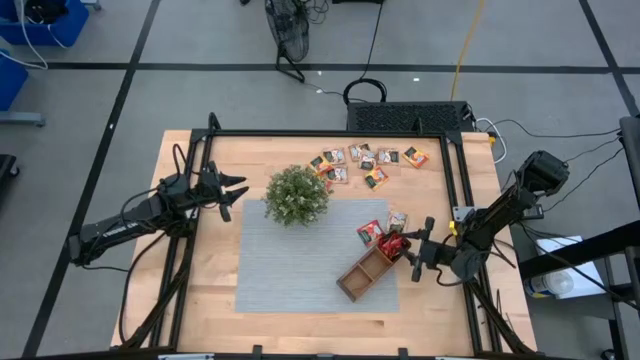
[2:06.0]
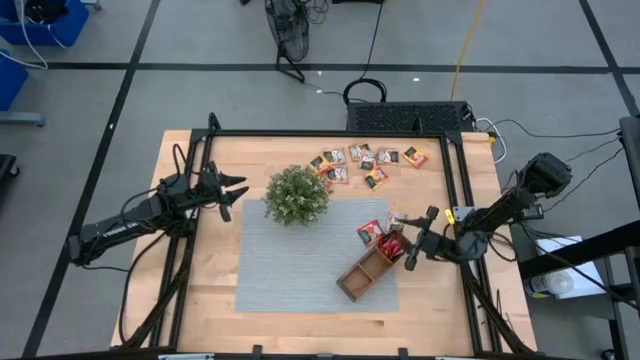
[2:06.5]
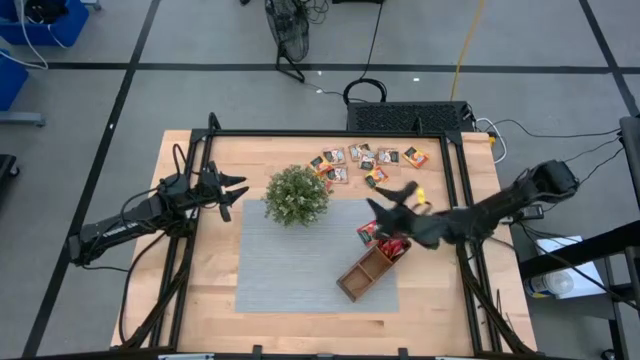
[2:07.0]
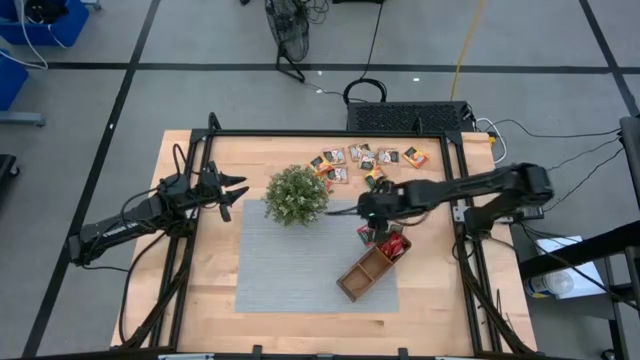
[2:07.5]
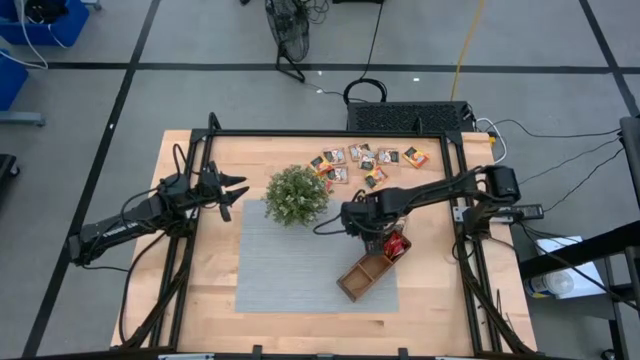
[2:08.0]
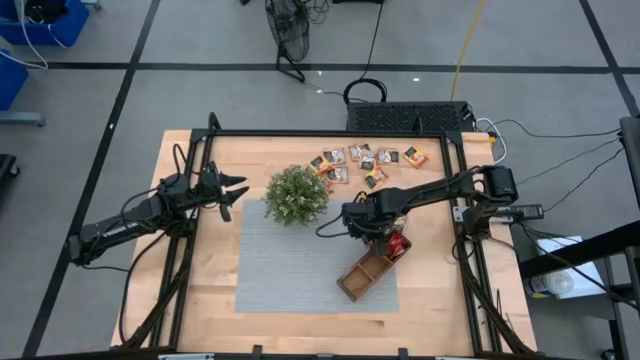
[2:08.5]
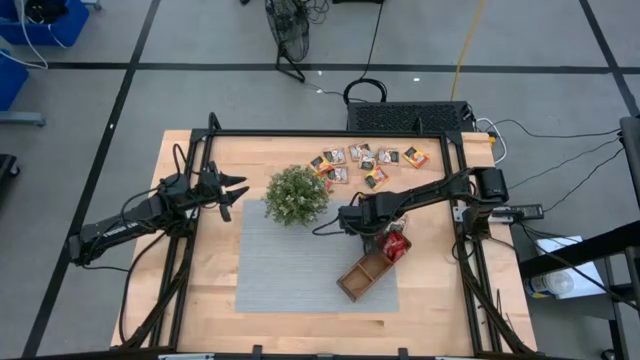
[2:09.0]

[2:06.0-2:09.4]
Task: Pick & Place Tea
Put the strawberry tea sachet into the brown organizer

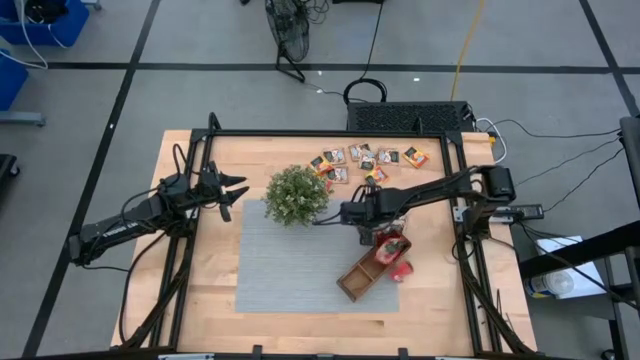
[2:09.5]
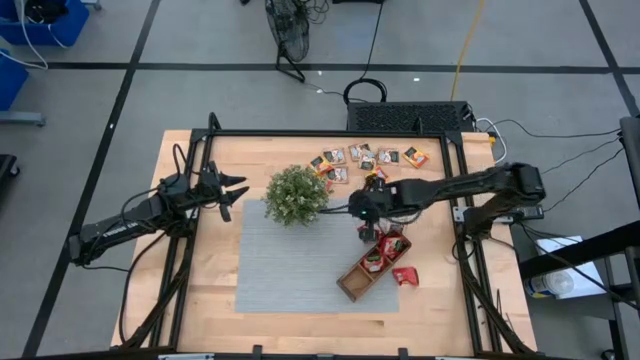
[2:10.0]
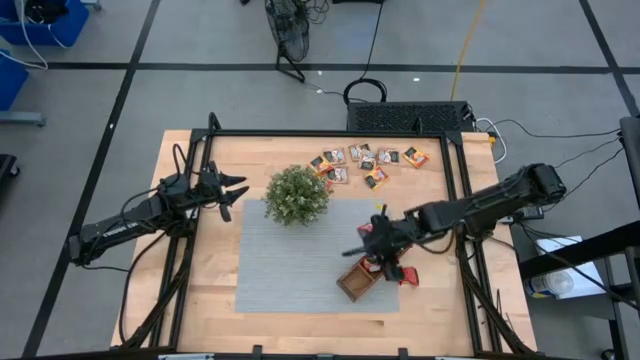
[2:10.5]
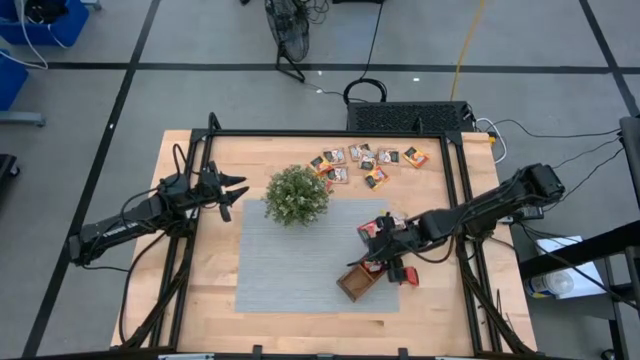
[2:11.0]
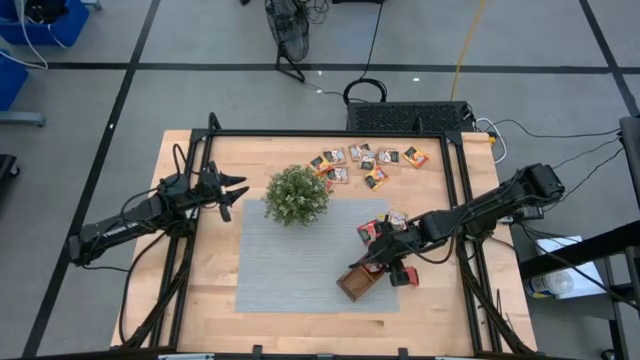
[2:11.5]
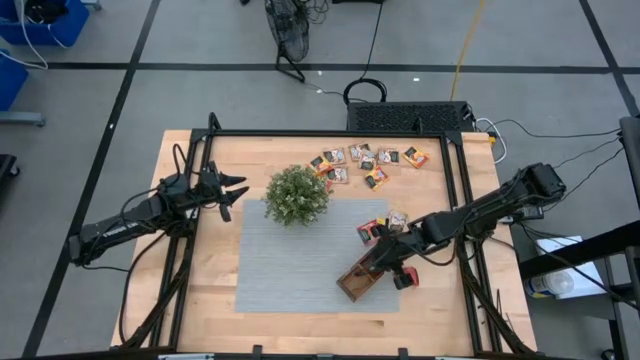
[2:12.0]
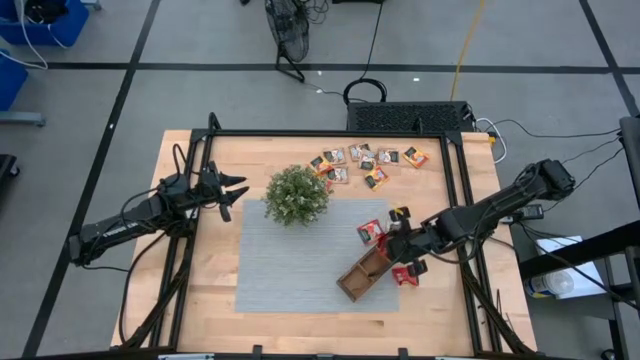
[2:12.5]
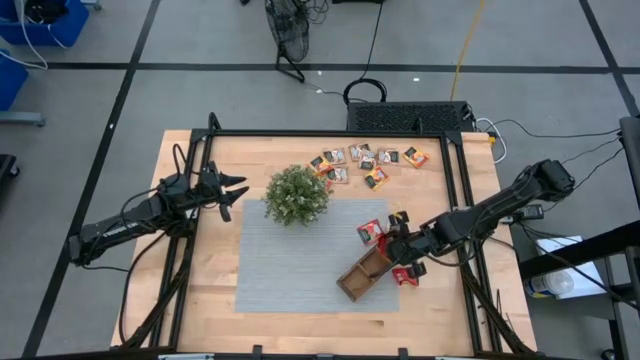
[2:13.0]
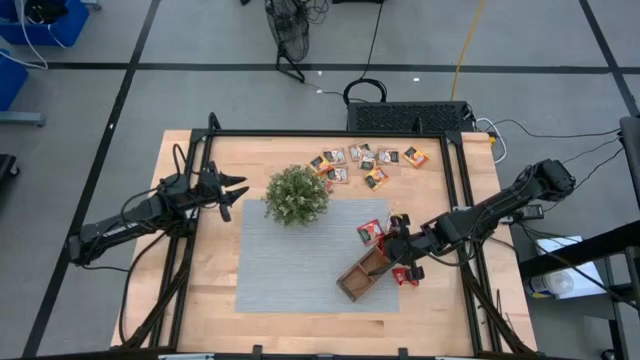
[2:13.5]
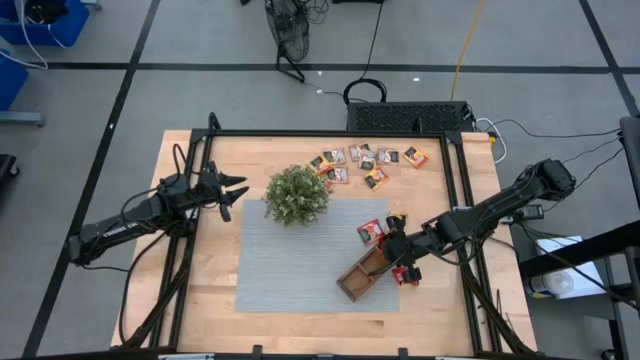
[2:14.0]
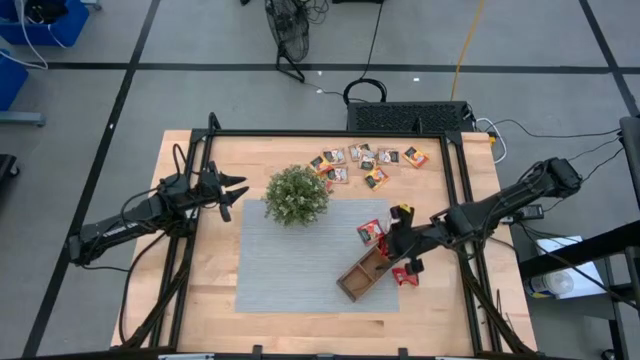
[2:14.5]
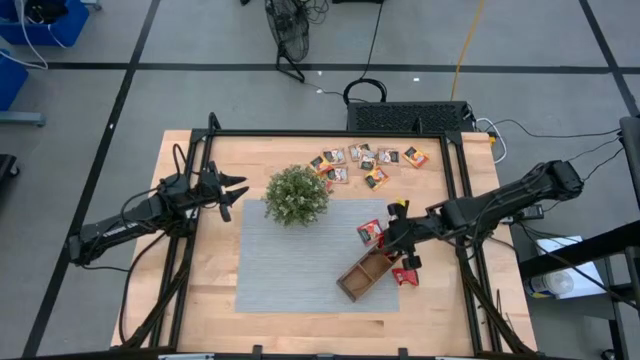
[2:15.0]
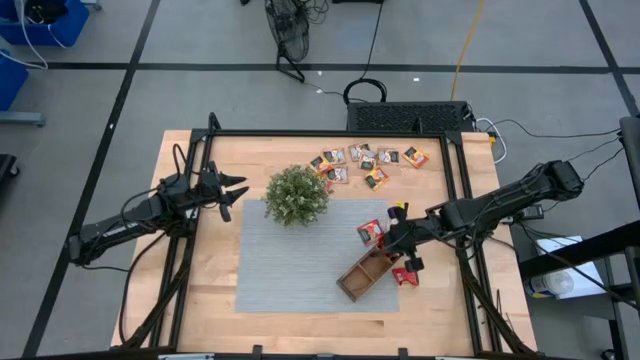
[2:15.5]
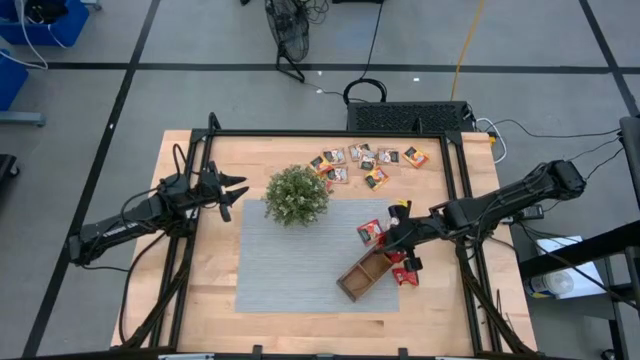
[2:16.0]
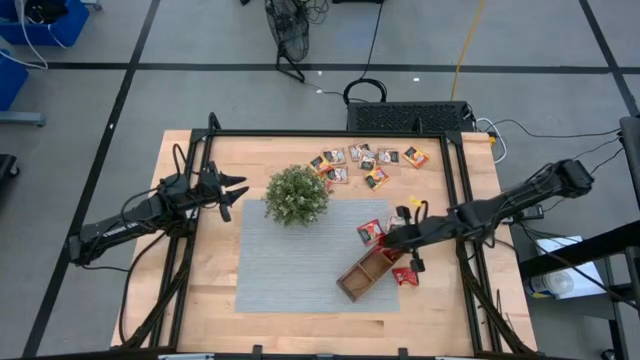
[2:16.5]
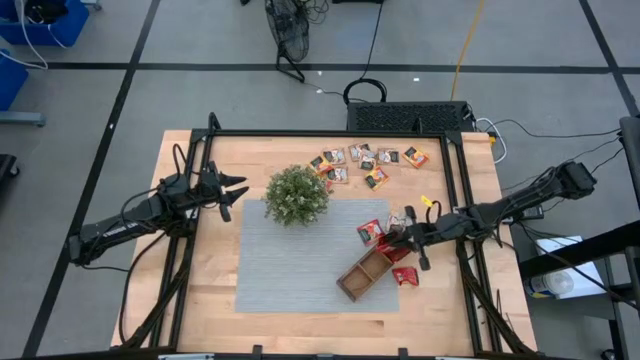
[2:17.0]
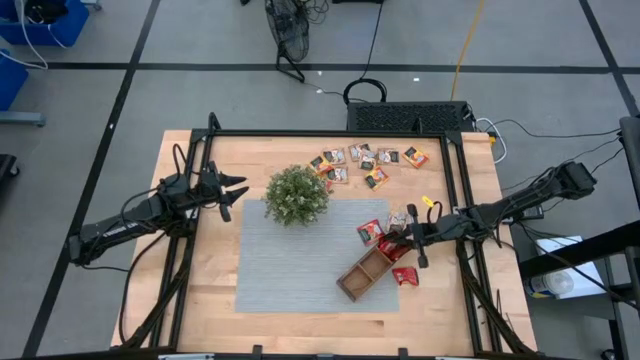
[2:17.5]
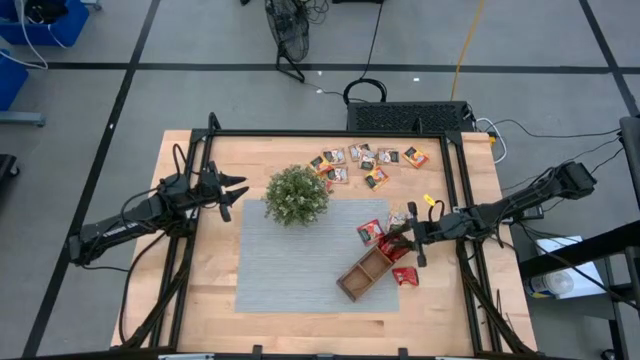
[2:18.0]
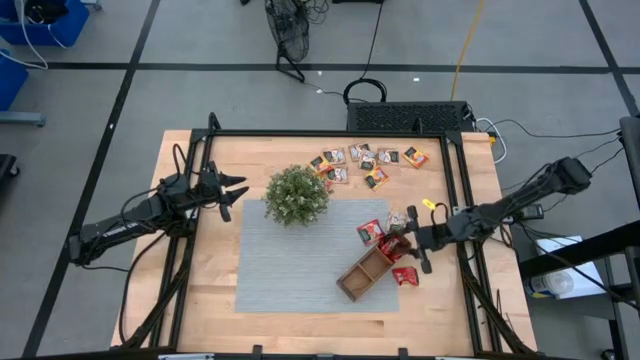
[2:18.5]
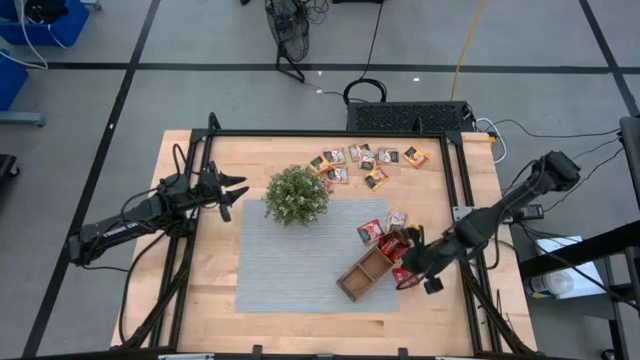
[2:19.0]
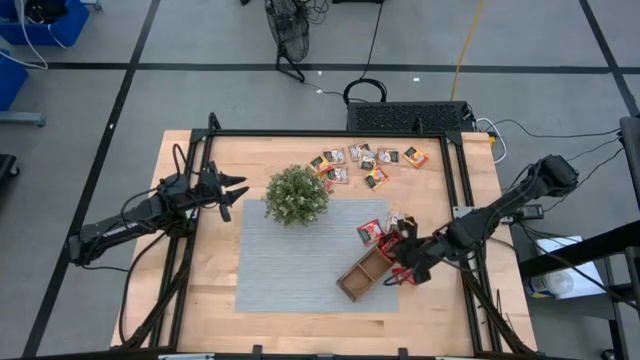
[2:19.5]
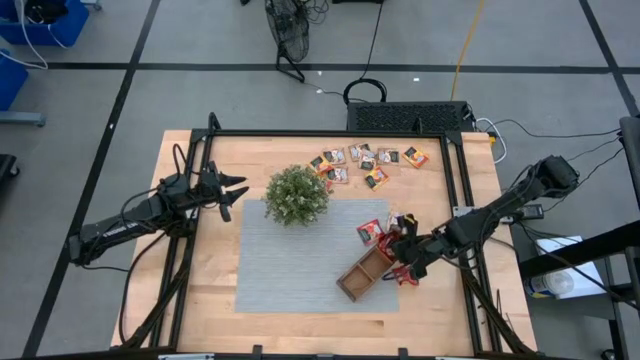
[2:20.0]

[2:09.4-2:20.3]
Put the strawberry tea sachet into the brown organizer

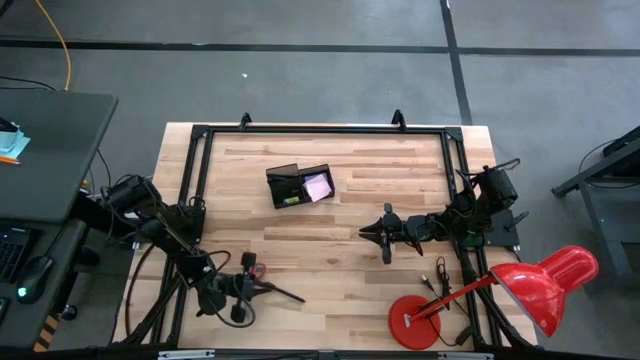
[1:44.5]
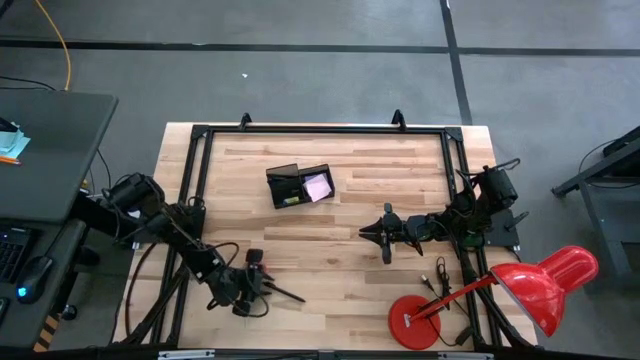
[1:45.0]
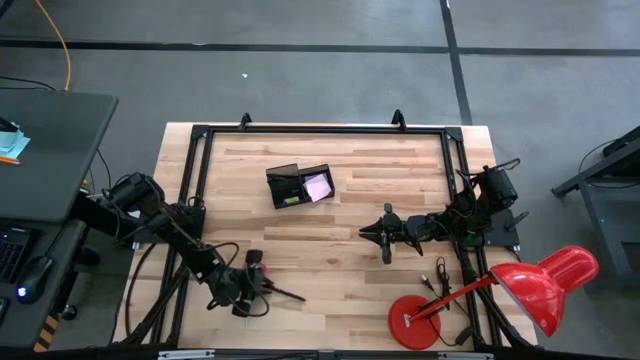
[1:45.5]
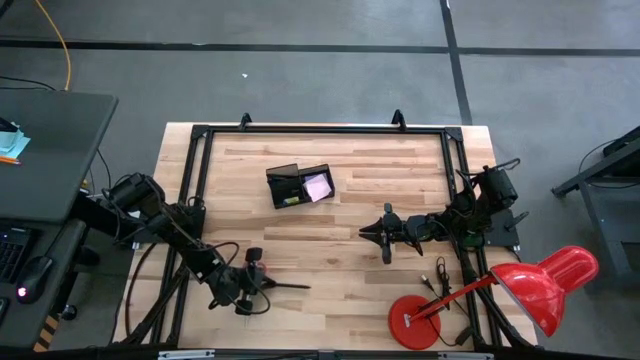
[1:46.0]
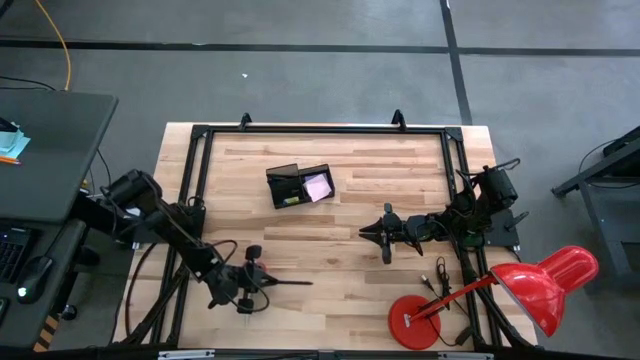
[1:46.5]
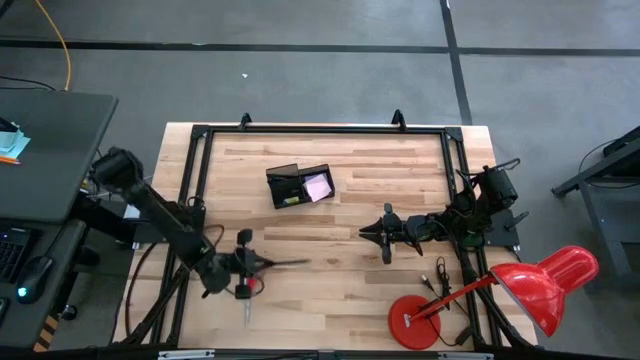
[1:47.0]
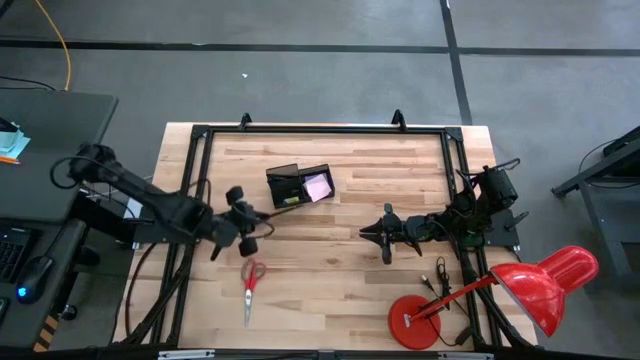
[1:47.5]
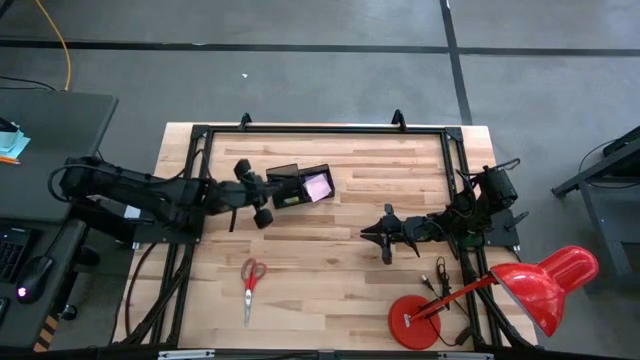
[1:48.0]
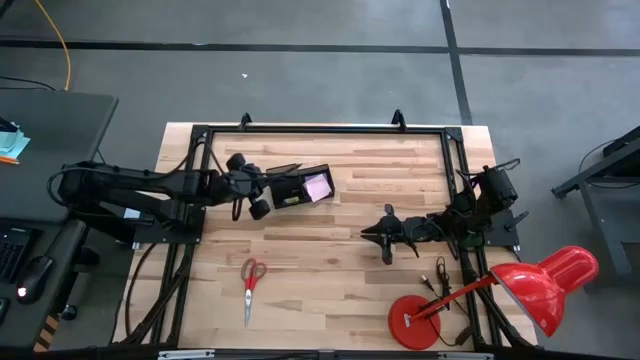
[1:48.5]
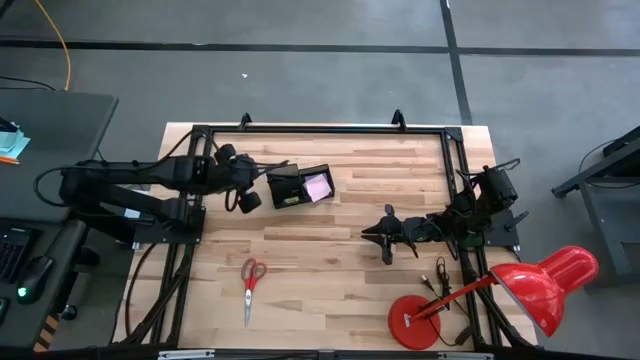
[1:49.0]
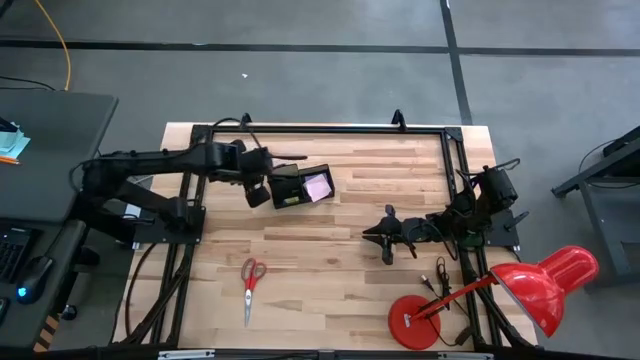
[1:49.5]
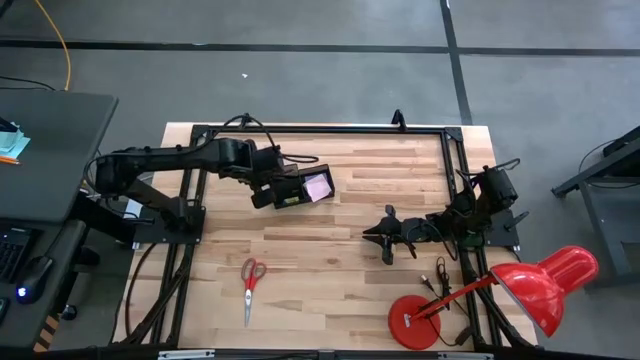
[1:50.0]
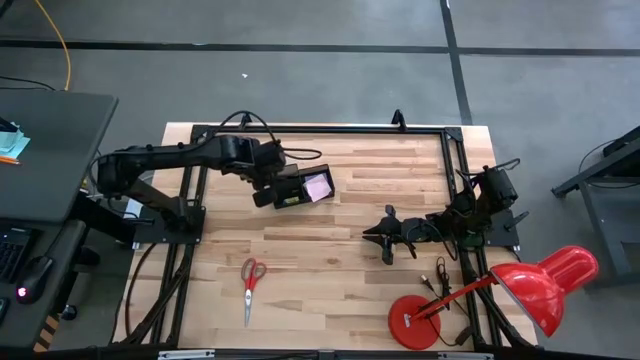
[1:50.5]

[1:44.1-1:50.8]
Task: Pick and place office supplies into organizer
Put the black pen into the black desk organizer
